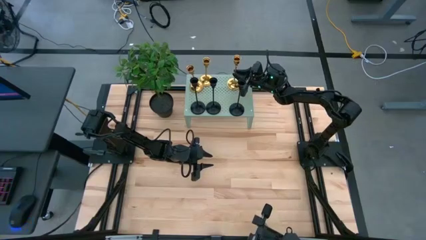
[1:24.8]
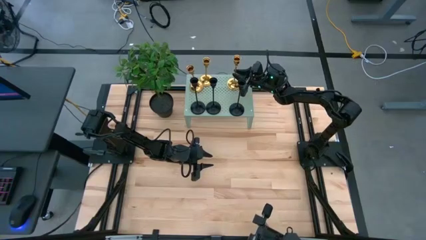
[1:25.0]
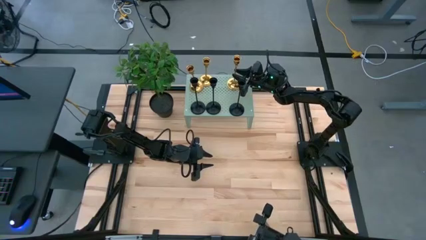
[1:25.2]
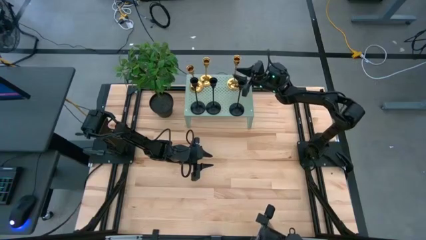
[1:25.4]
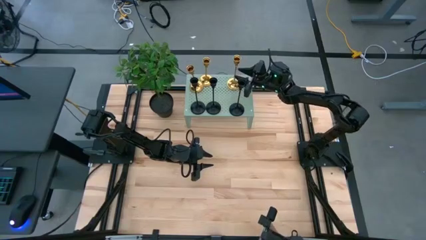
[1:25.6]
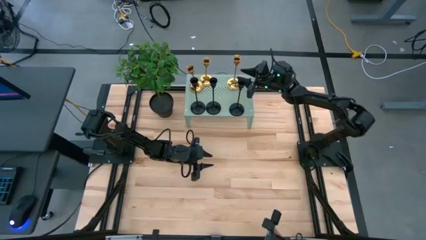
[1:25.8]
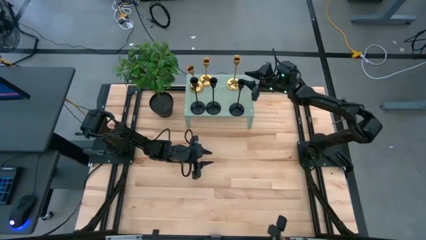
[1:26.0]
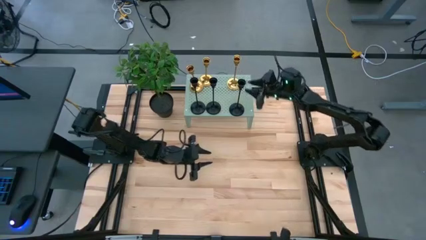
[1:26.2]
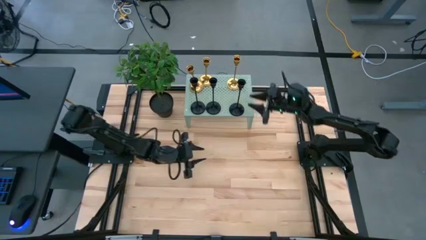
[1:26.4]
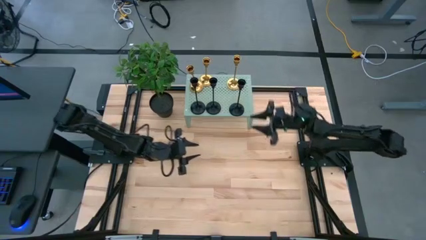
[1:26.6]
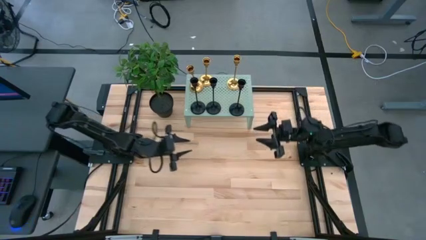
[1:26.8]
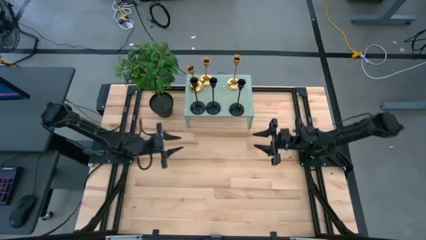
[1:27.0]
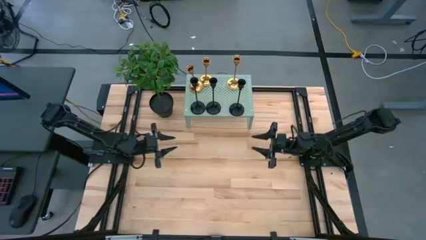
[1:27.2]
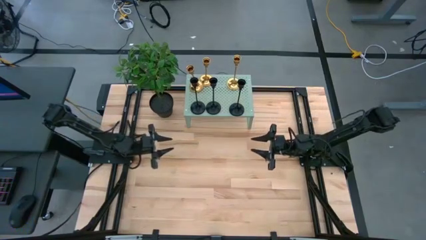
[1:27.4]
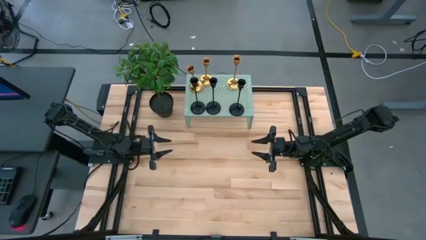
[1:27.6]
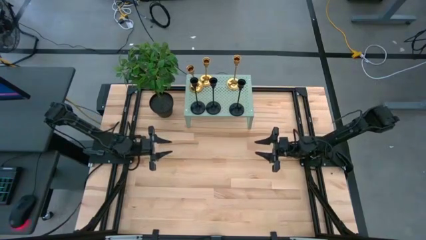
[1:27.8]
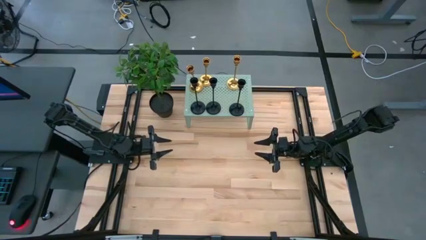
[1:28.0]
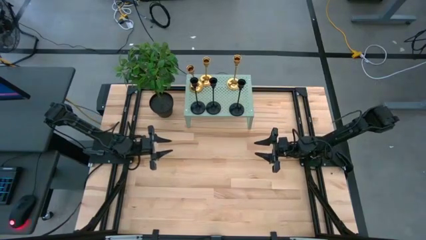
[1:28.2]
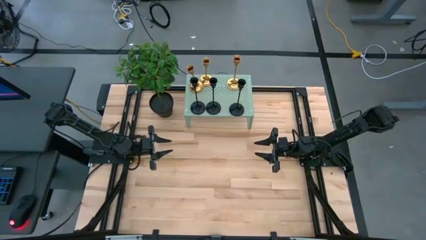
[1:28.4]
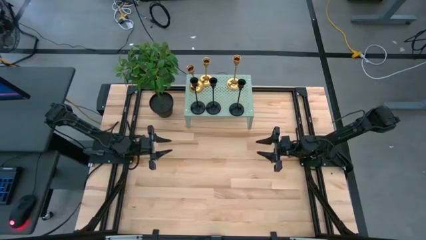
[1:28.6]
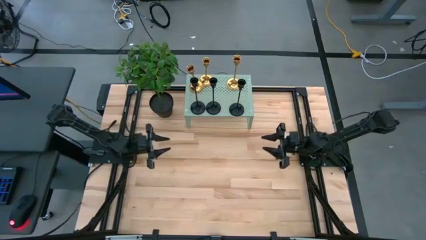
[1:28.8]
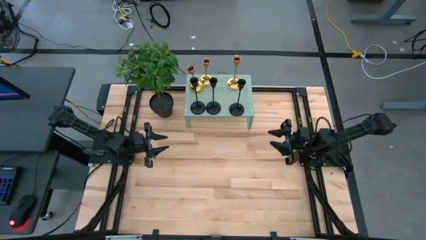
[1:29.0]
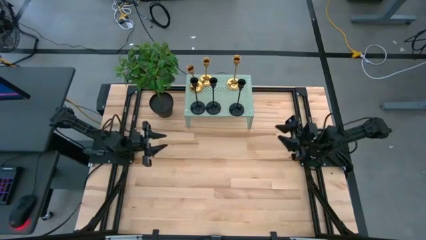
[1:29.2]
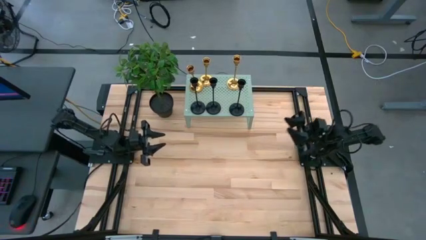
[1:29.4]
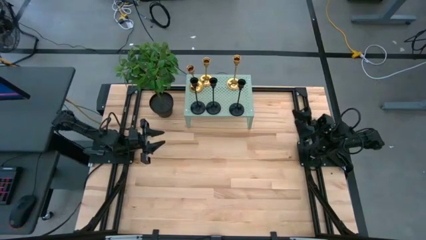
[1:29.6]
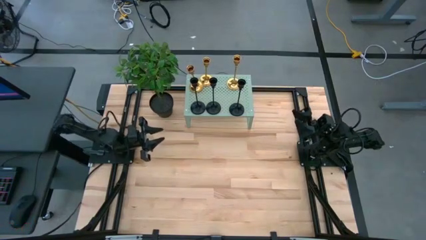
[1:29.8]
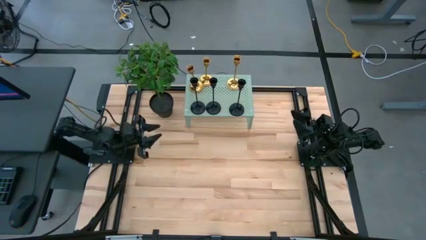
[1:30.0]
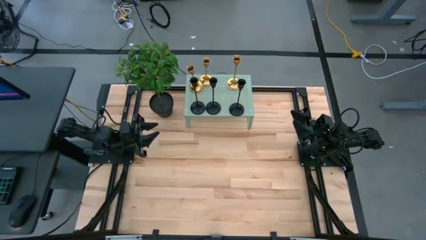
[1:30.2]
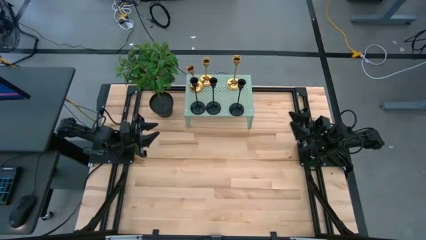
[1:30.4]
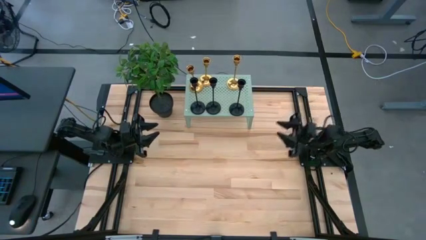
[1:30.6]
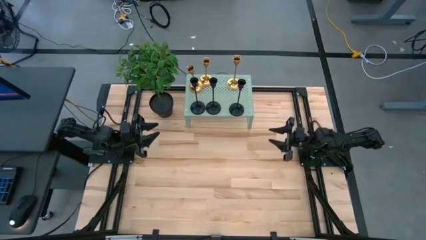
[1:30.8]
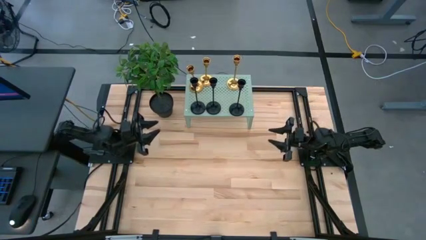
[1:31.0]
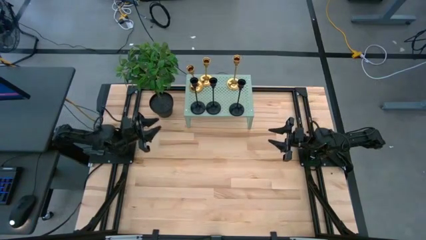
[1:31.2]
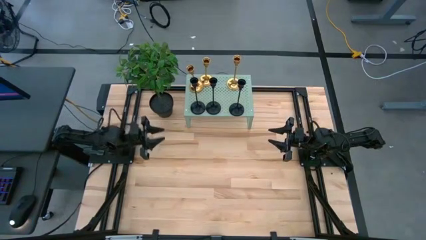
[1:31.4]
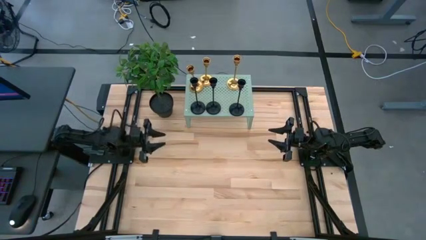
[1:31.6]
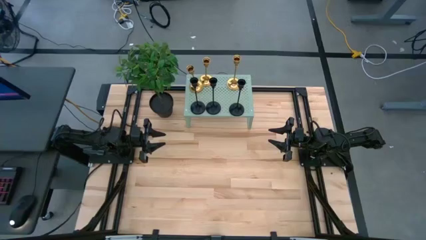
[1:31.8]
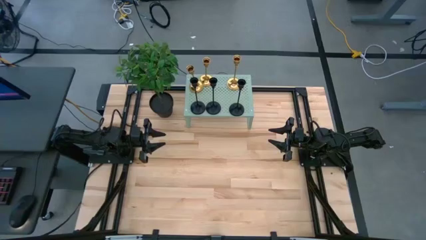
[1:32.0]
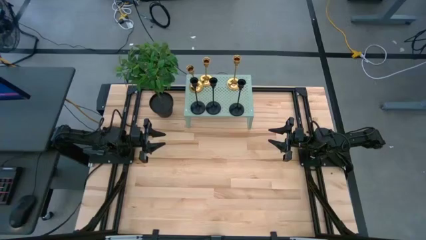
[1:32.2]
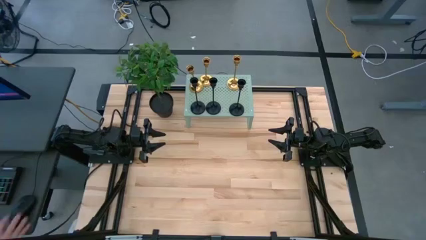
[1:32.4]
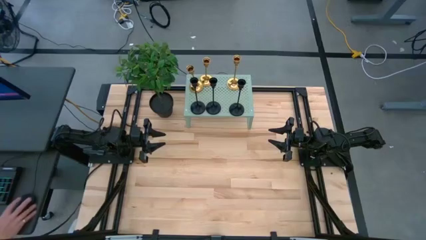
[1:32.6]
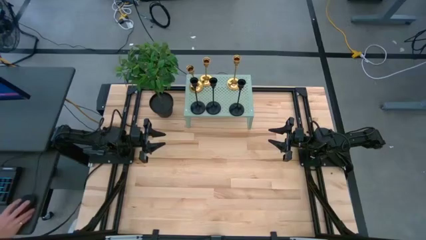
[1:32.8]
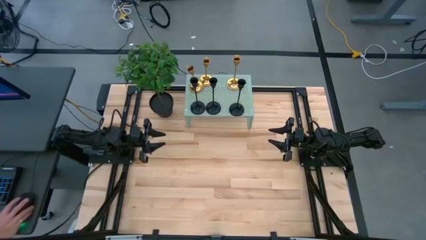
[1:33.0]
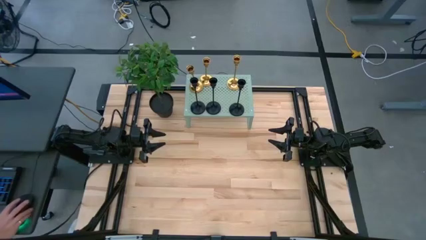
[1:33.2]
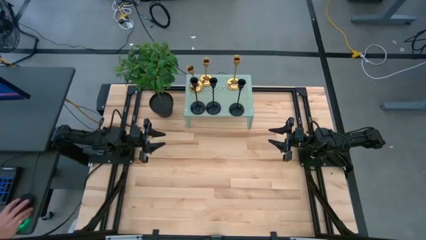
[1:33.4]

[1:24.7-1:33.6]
Task: Pick & Place candle stick holders
Return to Home Position

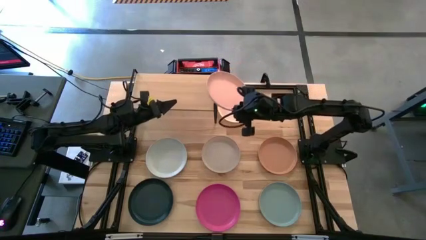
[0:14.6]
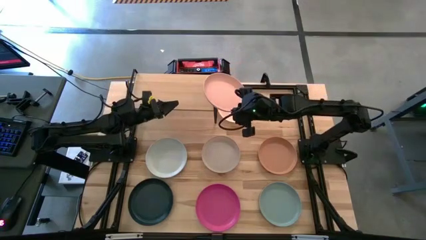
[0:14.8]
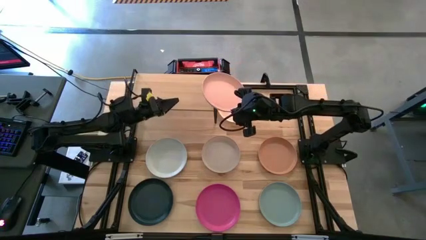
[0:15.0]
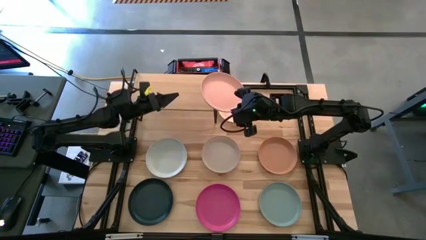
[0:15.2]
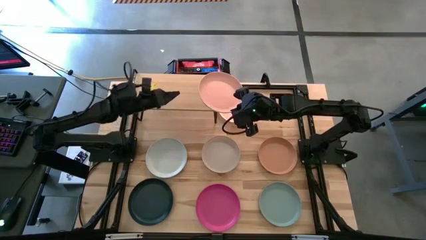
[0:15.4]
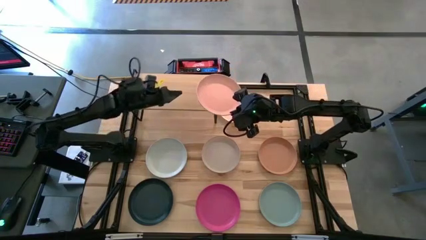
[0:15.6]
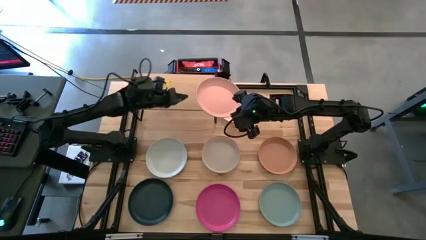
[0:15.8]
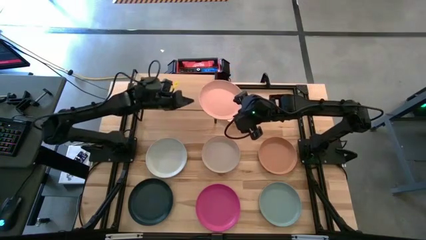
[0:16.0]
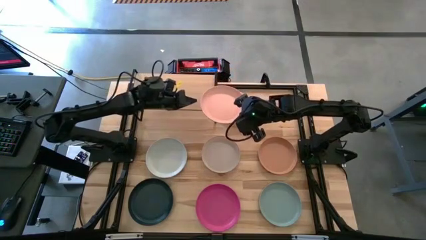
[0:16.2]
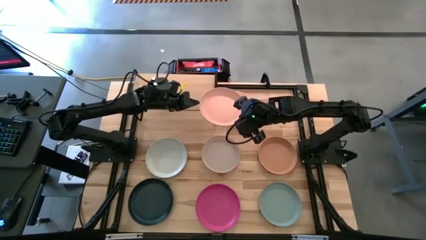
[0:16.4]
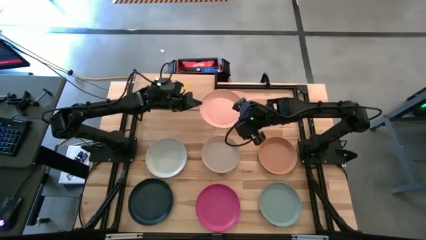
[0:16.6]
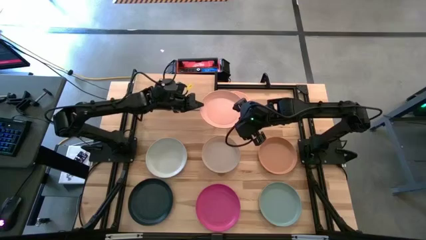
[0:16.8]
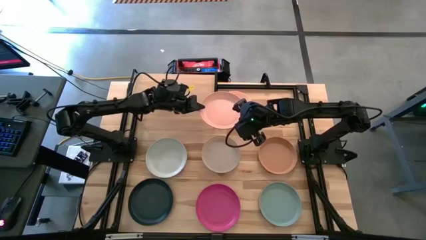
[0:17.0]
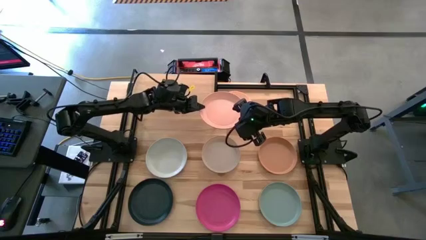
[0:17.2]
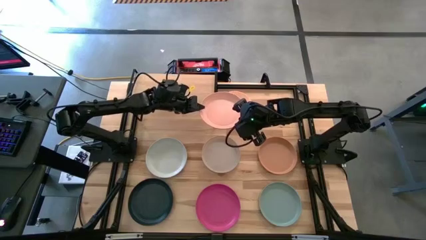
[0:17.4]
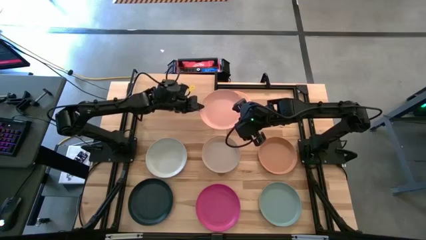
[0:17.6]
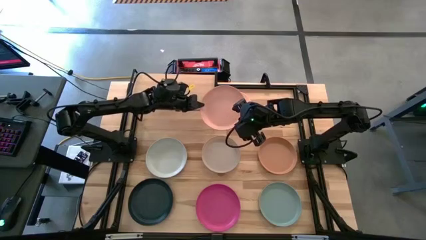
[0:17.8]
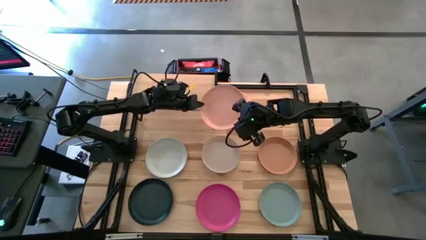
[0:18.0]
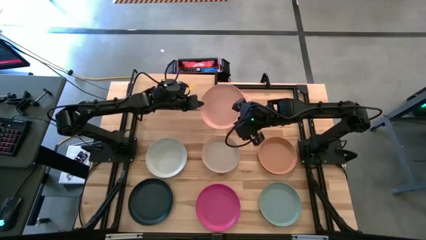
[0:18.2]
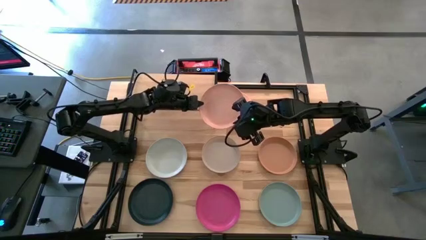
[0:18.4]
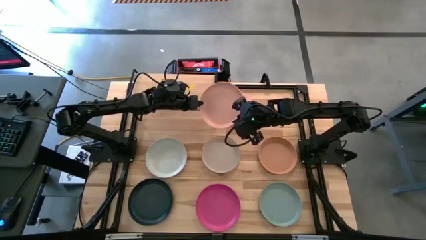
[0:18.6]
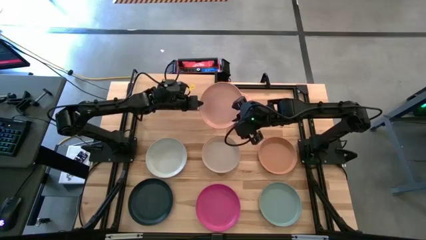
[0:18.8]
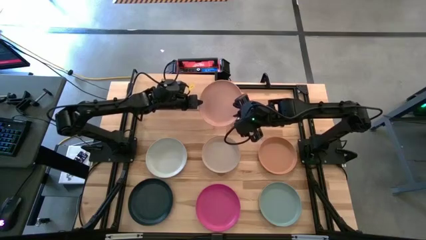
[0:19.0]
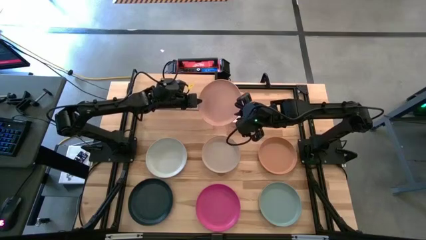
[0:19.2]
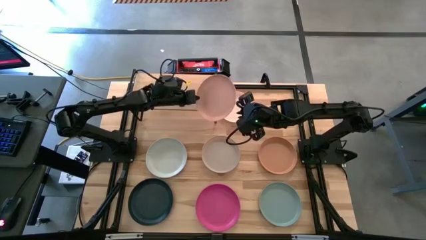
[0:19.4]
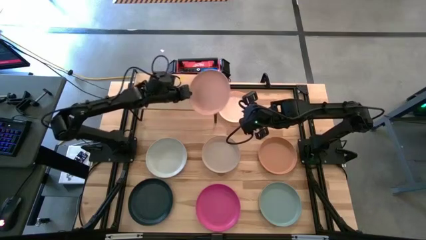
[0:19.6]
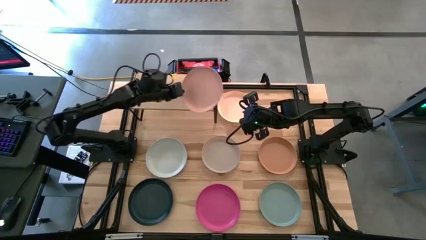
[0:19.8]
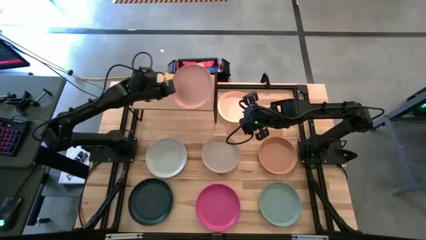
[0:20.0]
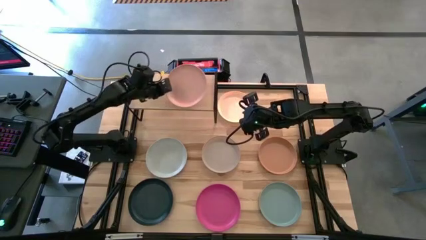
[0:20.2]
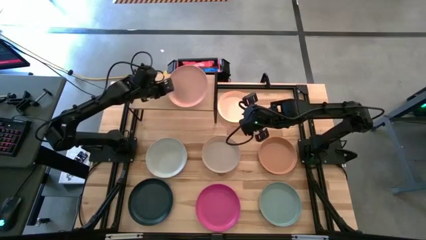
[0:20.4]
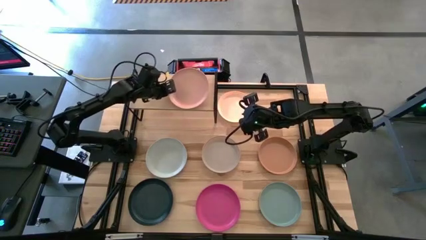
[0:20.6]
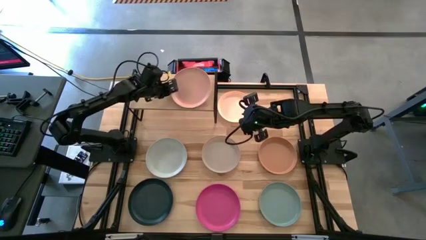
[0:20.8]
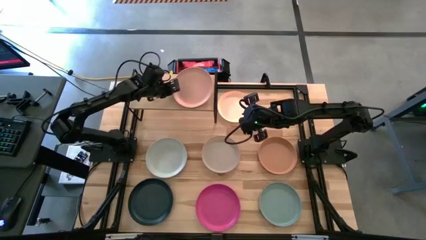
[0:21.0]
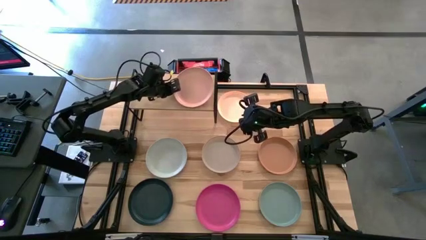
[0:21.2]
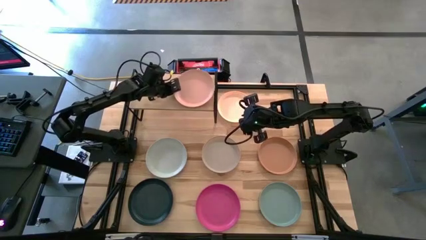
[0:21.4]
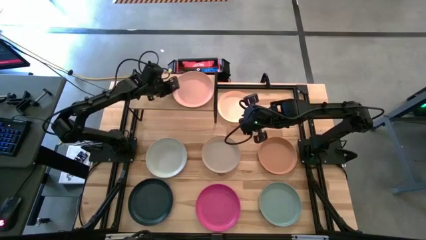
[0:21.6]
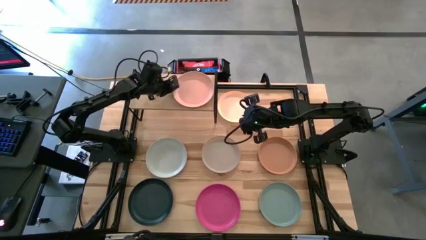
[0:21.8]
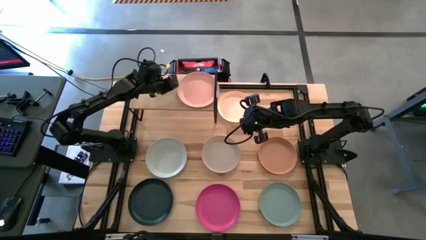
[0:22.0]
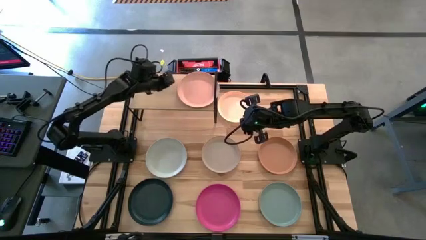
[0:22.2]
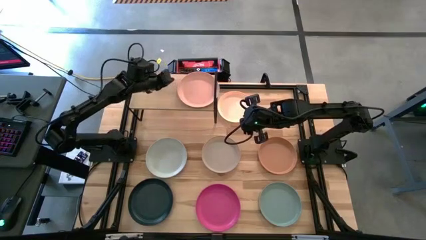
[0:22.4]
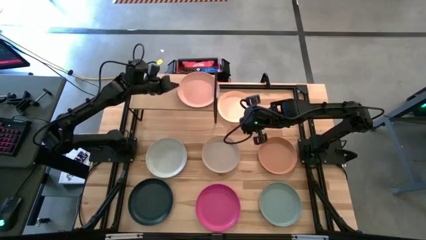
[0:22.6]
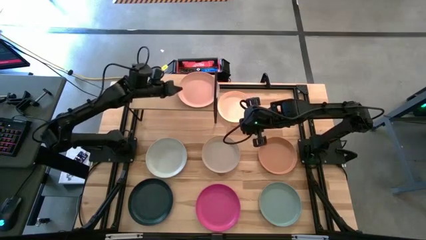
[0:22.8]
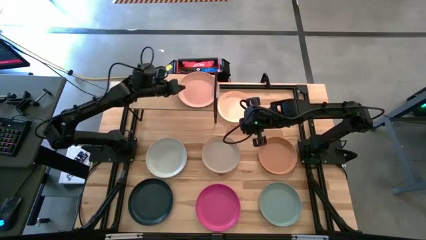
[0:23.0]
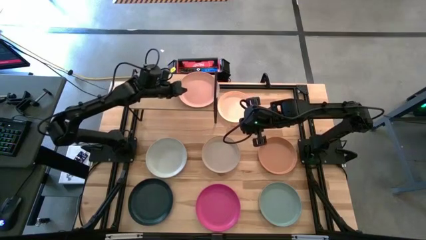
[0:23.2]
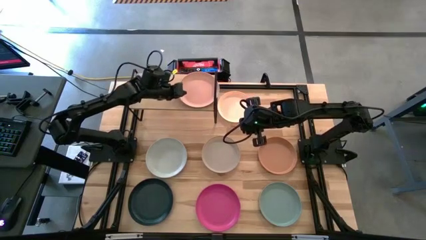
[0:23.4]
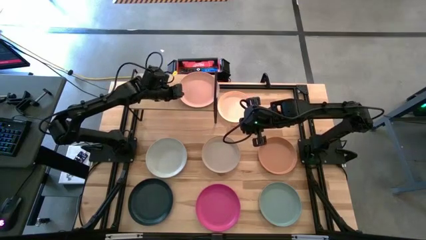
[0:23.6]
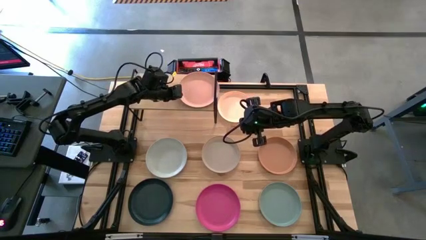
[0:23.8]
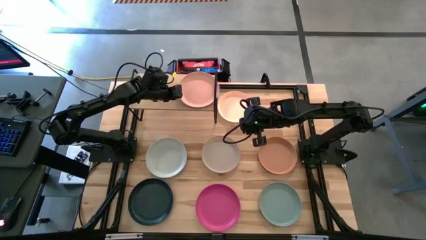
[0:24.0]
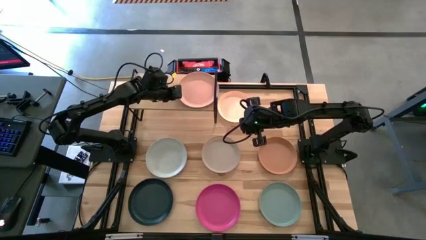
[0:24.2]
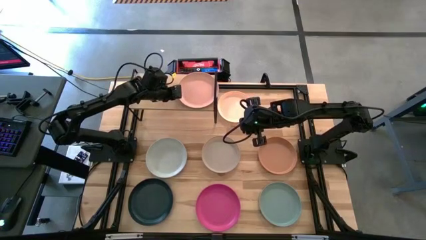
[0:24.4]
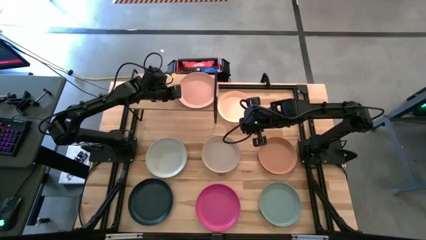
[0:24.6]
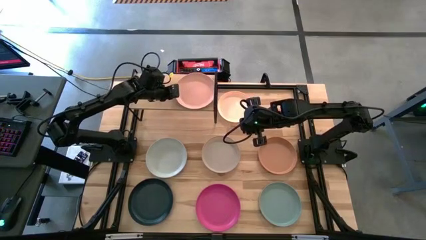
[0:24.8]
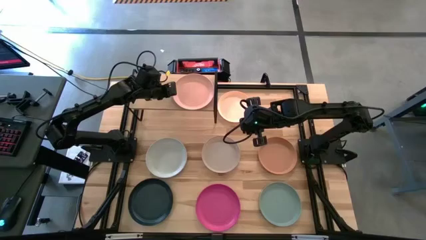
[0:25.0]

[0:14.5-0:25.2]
Task: Place and stack plates onto a shelf
Put the light pink plate on the shelf
